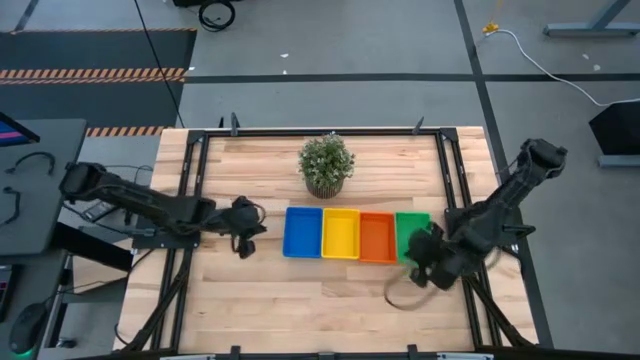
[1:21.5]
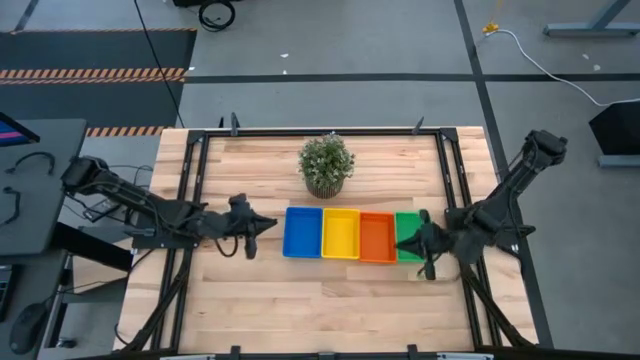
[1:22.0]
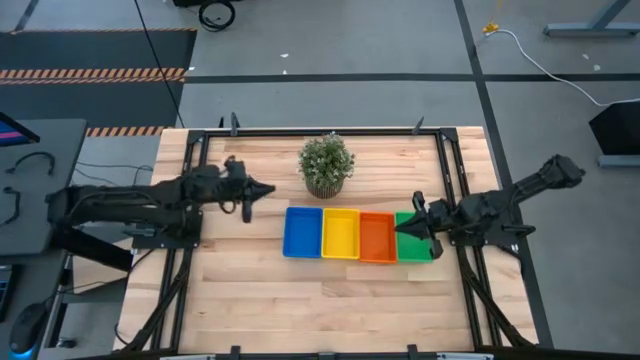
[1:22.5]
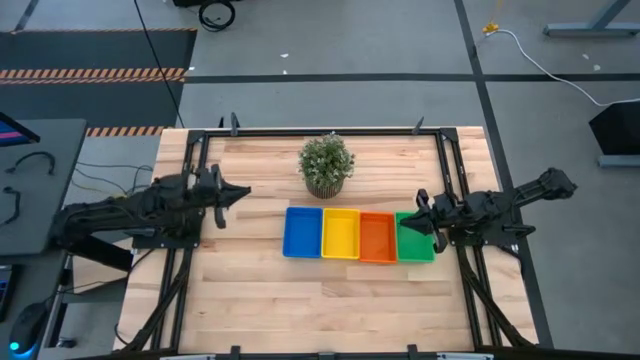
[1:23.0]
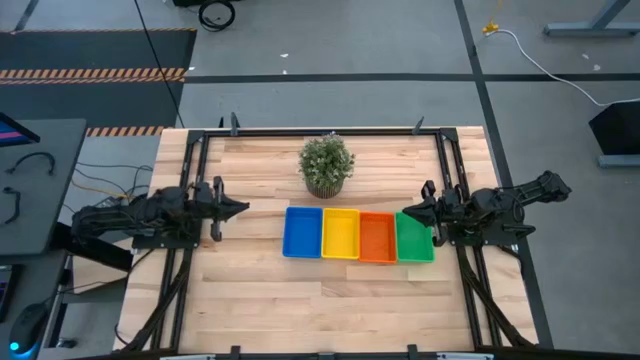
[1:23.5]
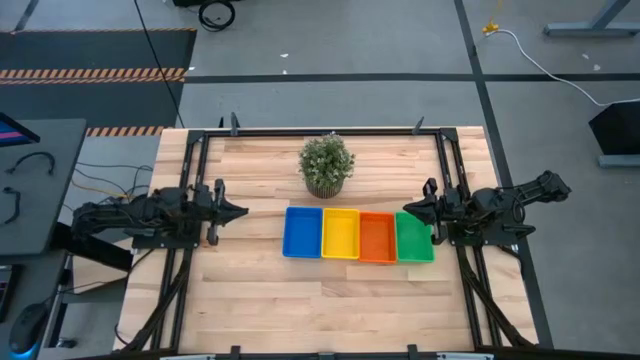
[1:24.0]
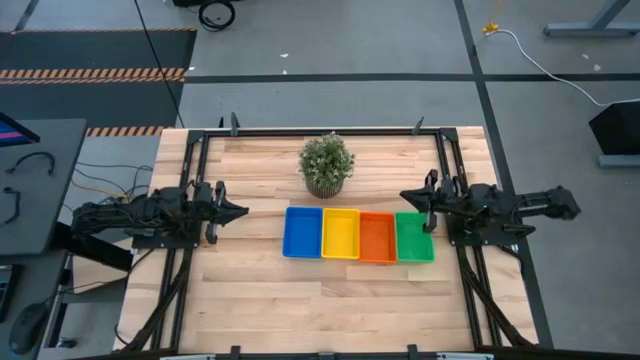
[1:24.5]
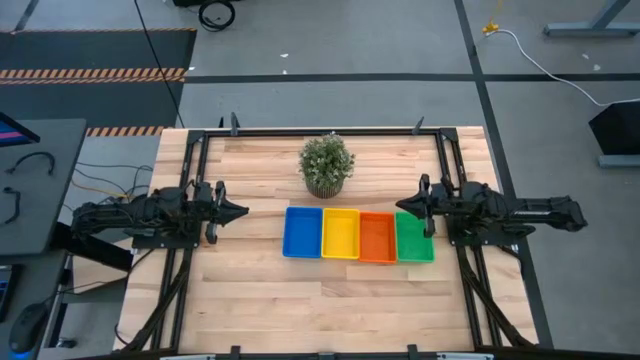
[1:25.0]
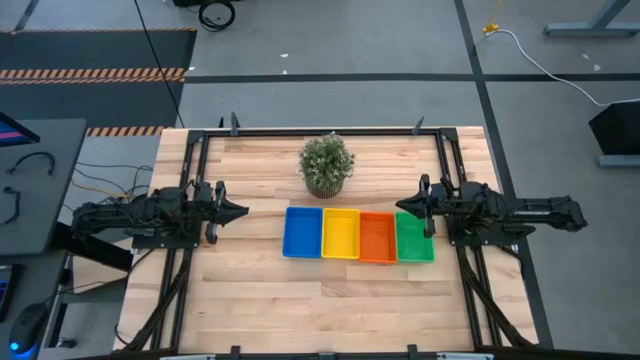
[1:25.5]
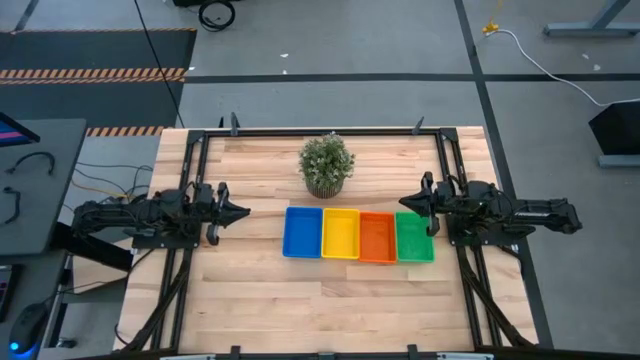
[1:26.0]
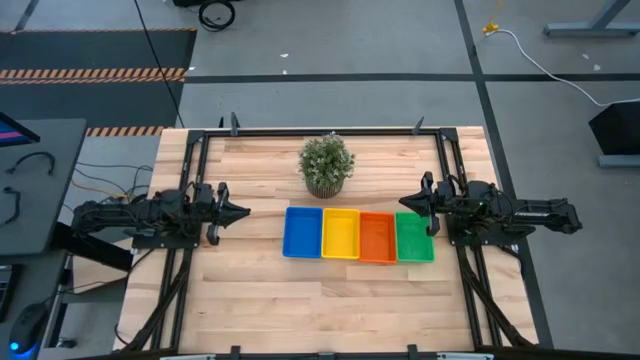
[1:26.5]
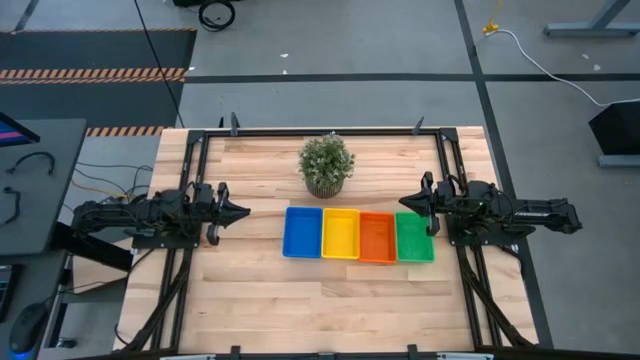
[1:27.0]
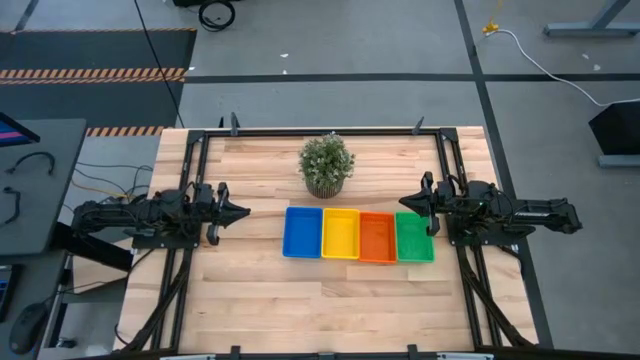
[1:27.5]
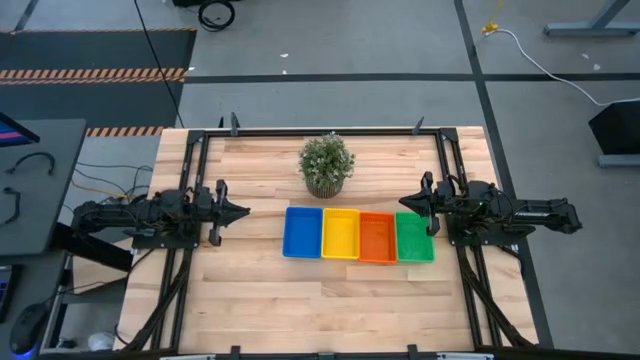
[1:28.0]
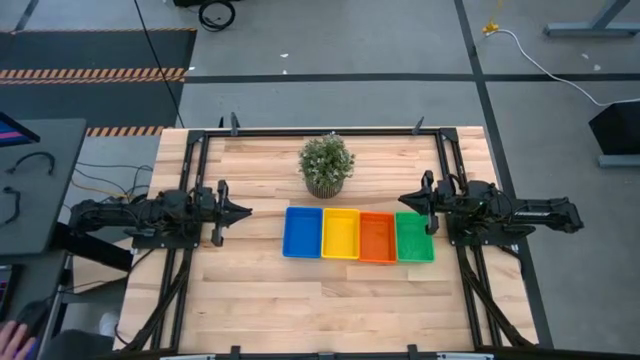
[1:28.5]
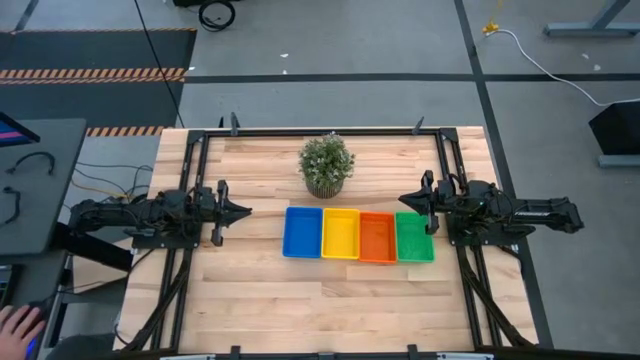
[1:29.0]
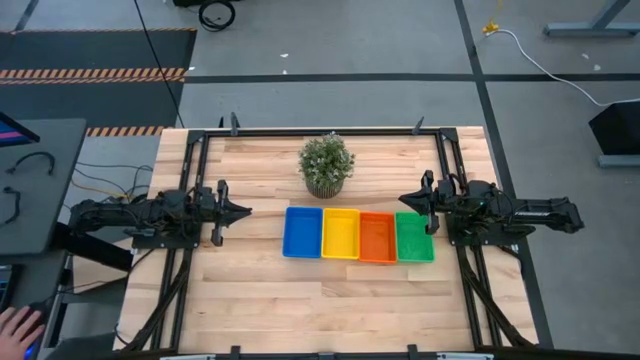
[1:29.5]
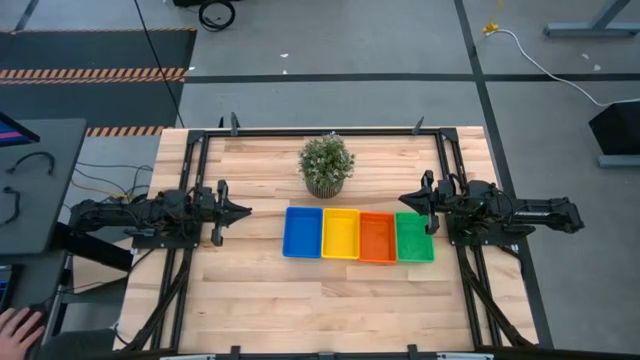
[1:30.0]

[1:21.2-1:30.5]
Return to Home Position

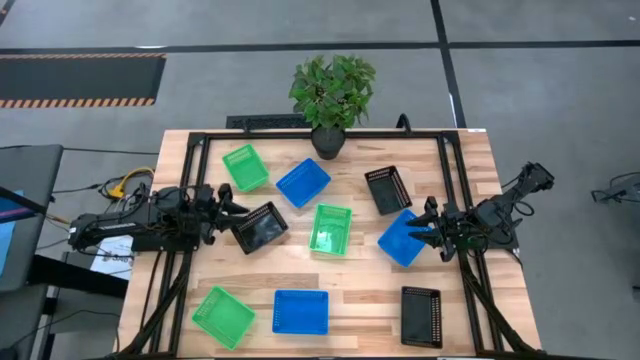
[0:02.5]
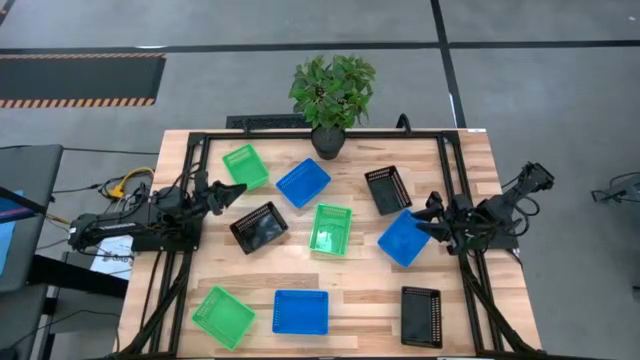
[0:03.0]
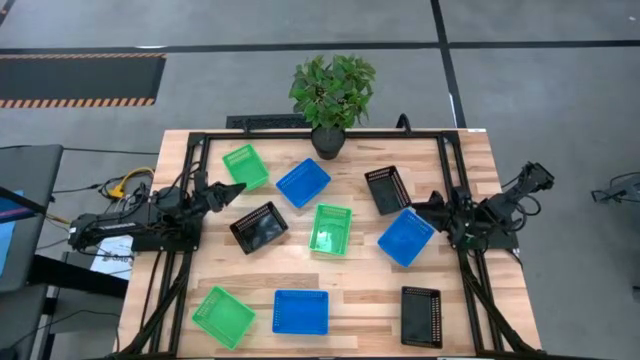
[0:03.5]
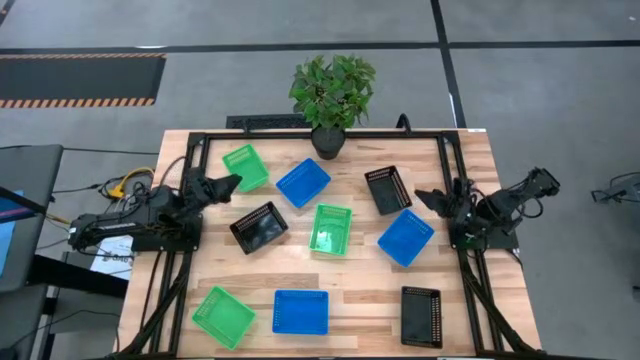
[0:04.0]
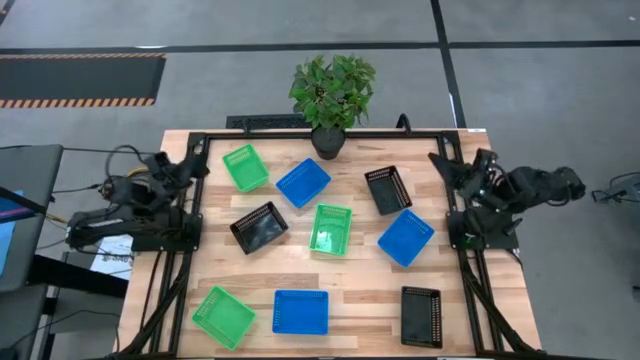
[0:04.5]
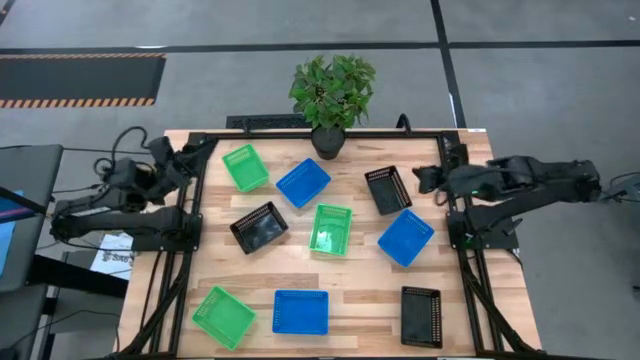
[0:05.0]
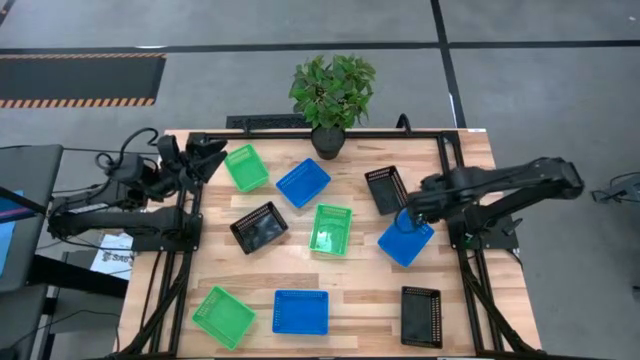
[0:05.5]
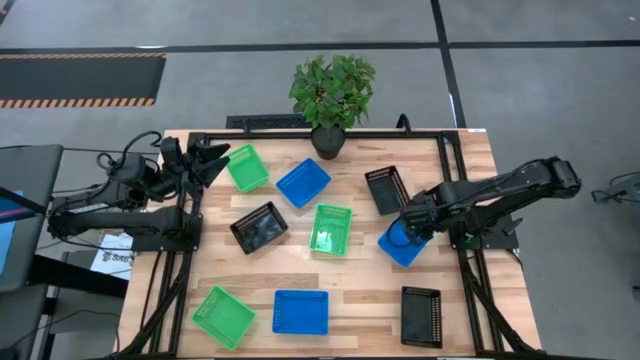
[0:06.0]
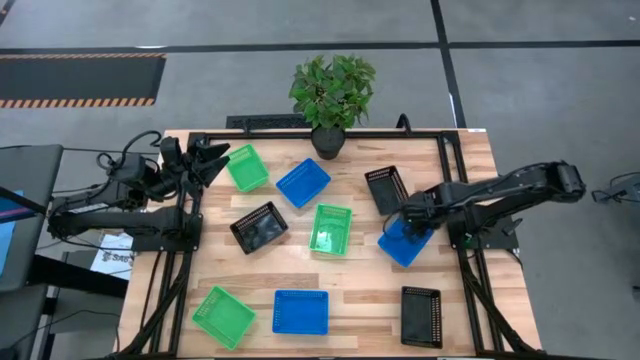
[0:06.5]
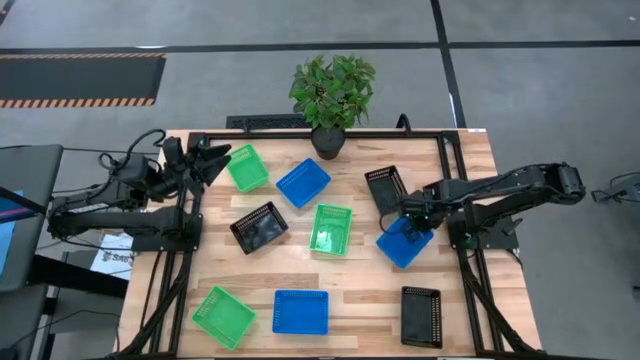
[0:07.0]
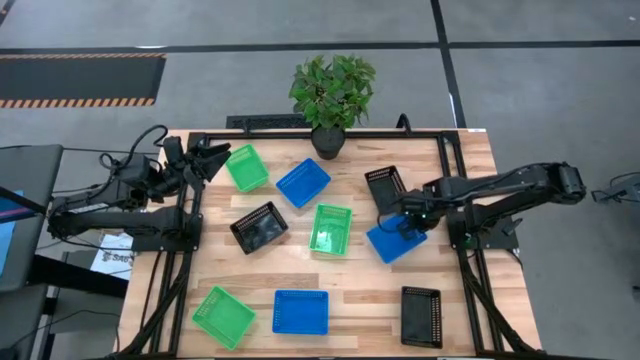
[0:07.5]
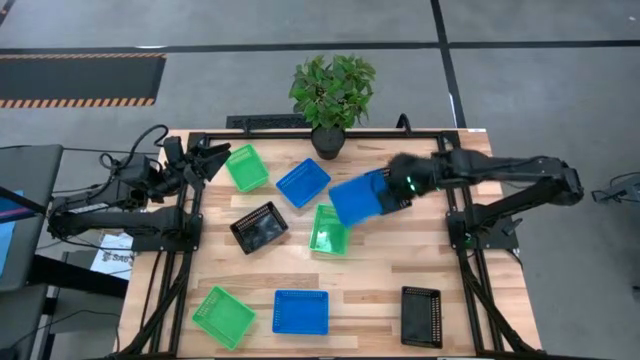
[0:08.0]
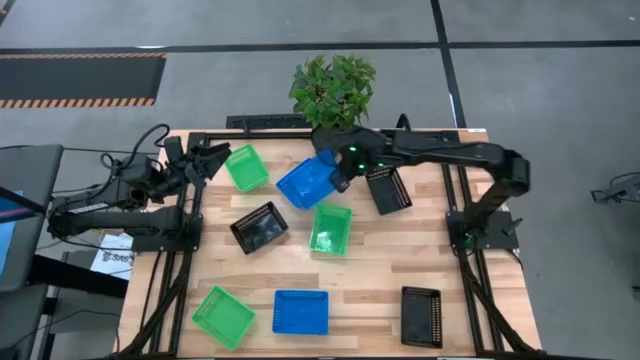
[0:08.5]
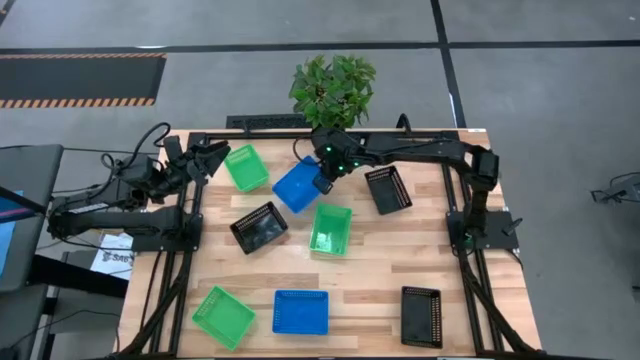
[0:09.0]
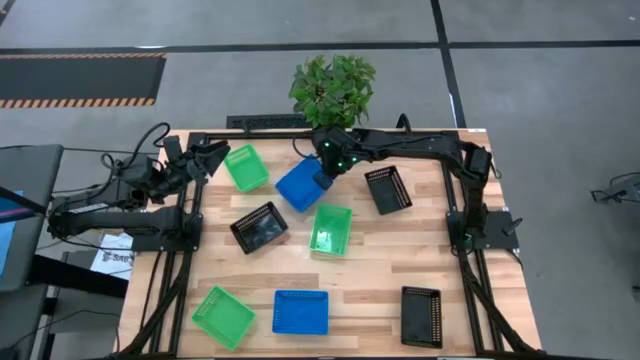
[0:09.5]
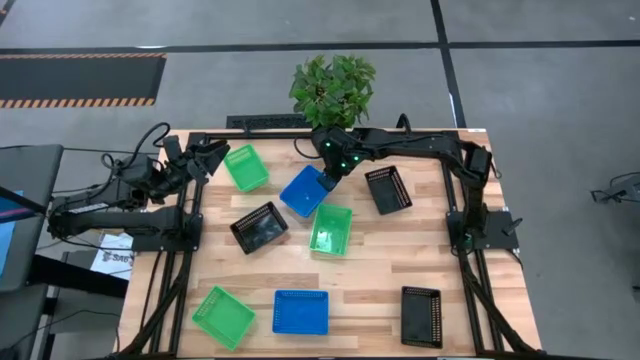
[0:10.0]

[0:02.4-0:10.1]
Stack the middle blue bin on the top blue bin

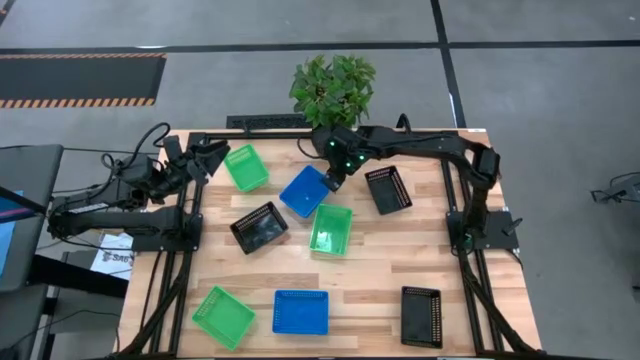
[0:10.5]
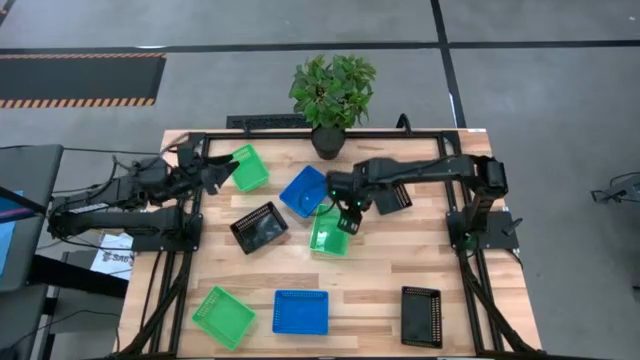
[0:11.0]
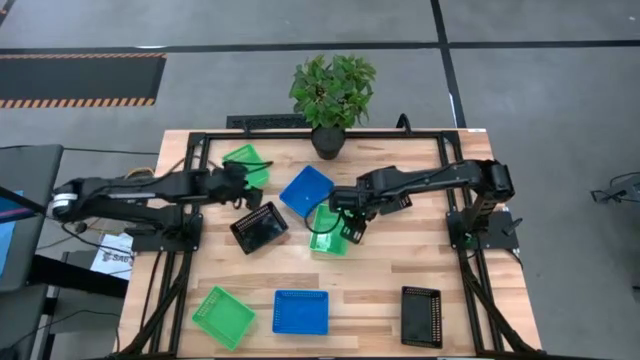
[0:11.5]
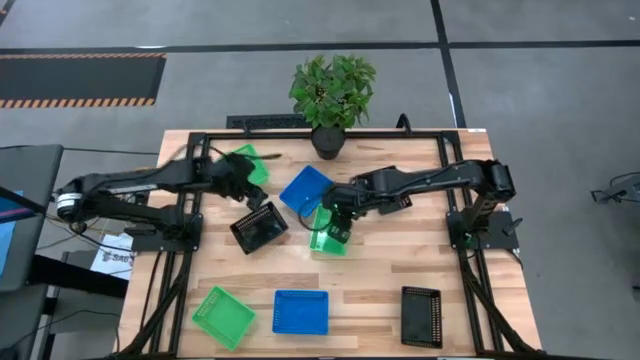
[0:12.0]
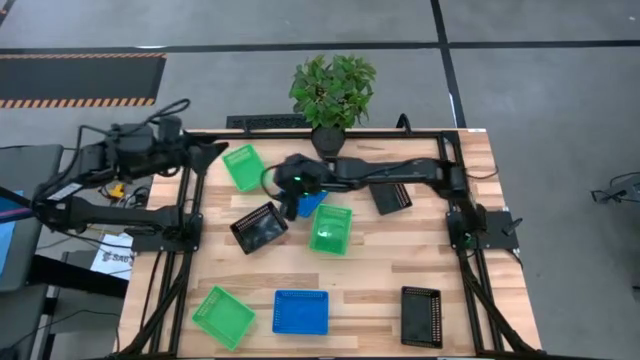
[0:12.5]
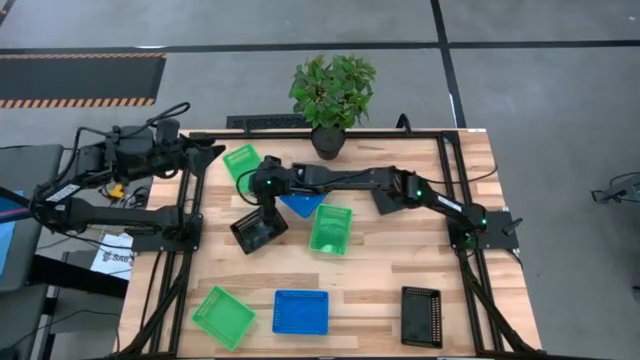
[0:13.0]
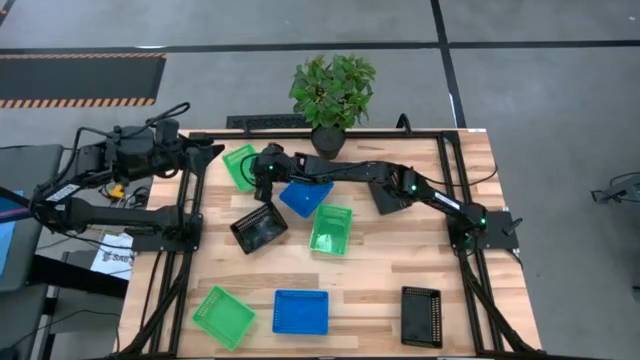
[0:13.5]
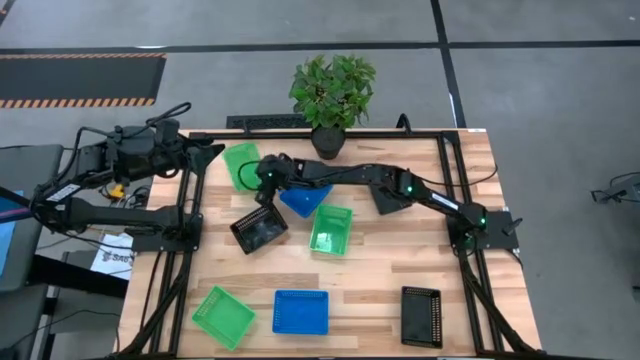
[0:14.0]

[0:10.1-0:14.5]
Stack the top green bin on the middle right green bin
